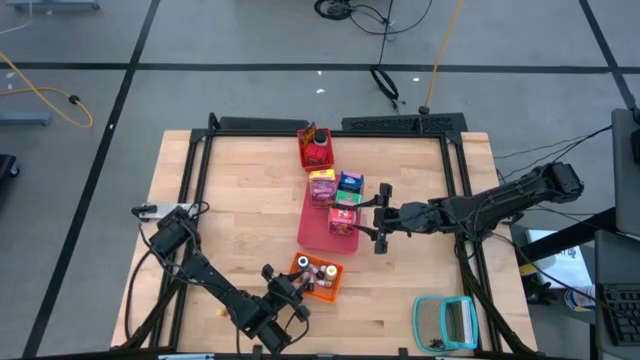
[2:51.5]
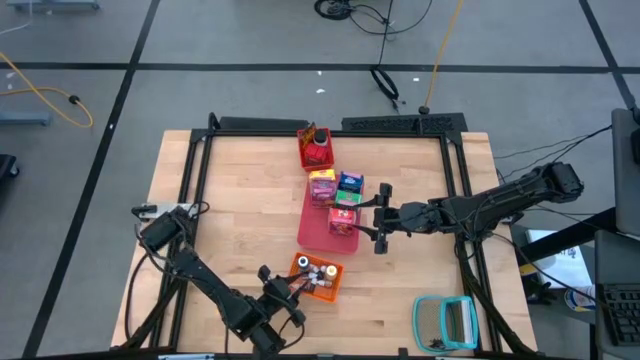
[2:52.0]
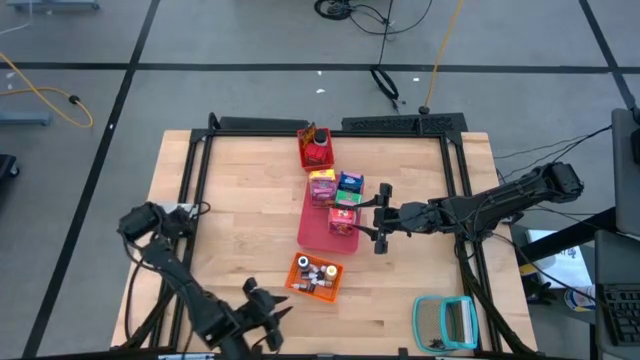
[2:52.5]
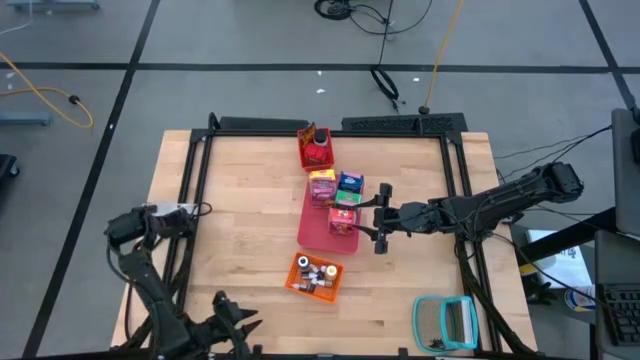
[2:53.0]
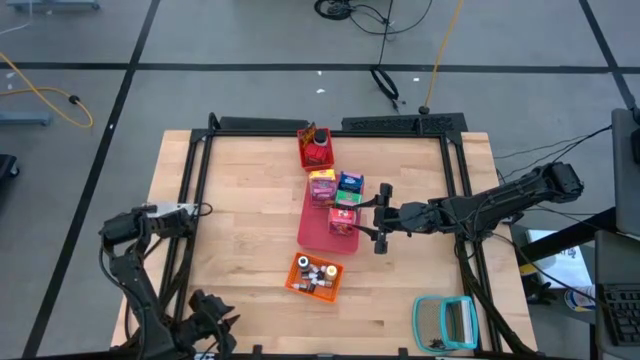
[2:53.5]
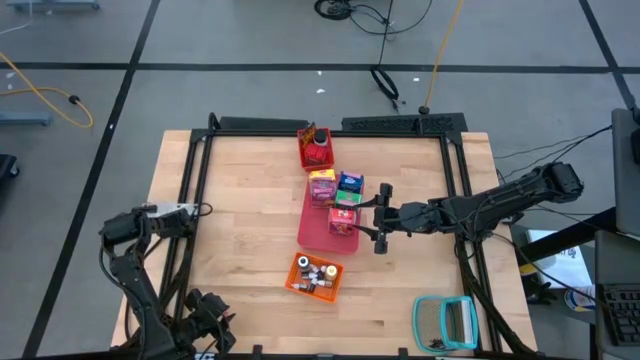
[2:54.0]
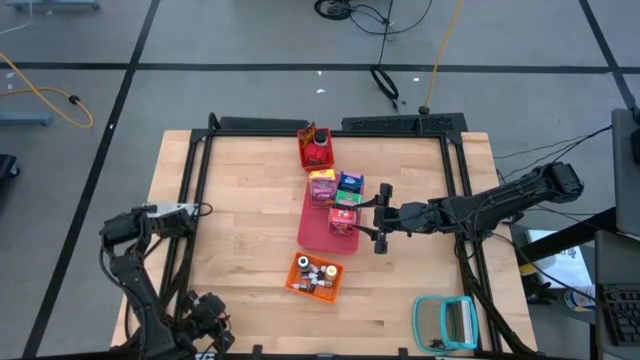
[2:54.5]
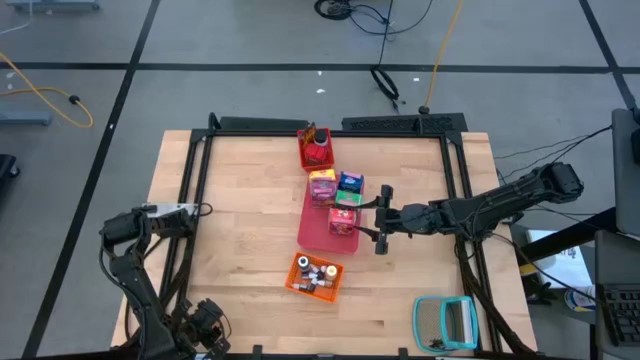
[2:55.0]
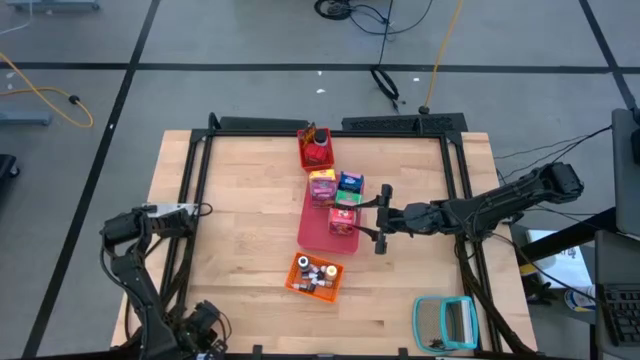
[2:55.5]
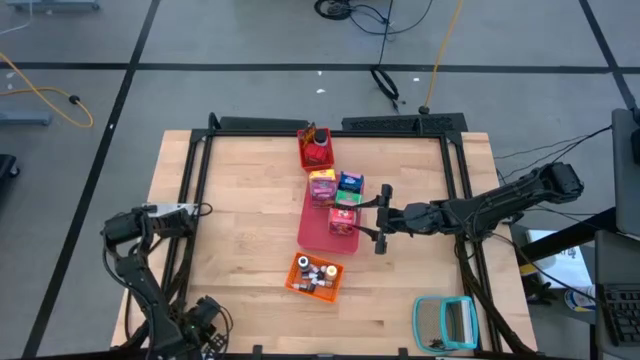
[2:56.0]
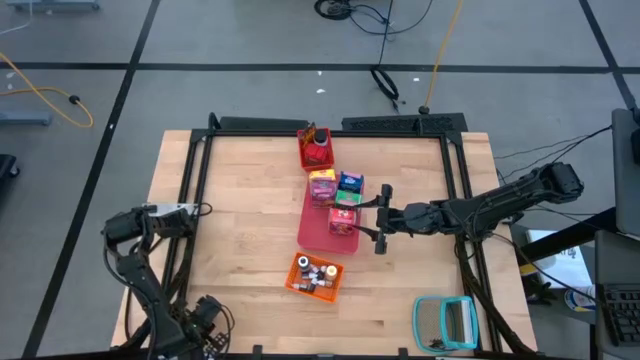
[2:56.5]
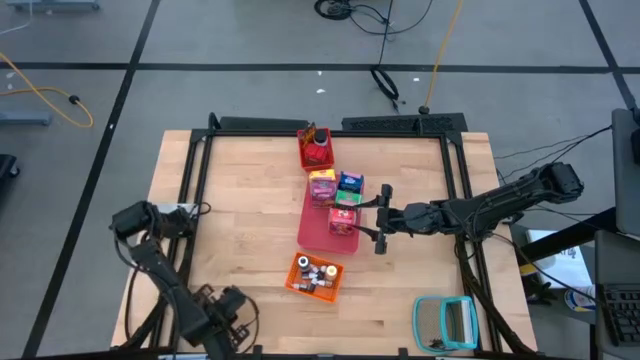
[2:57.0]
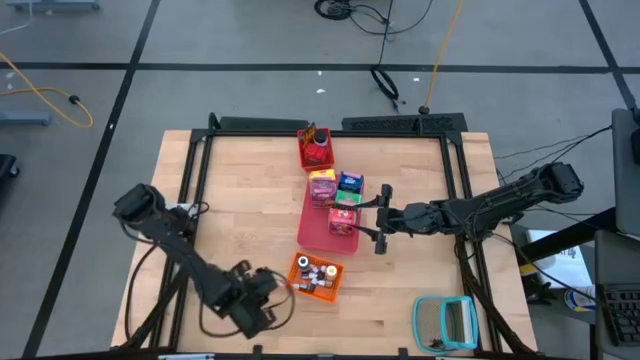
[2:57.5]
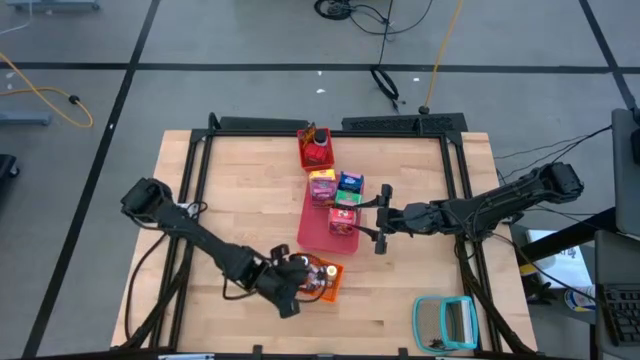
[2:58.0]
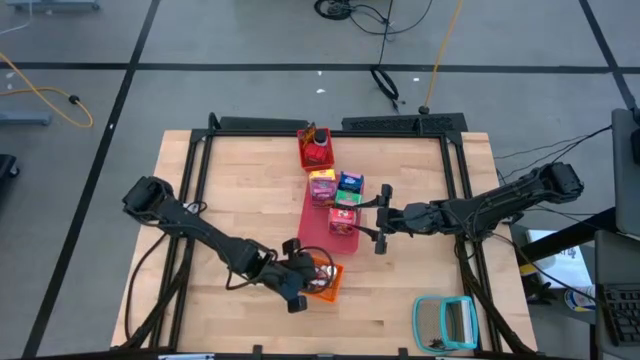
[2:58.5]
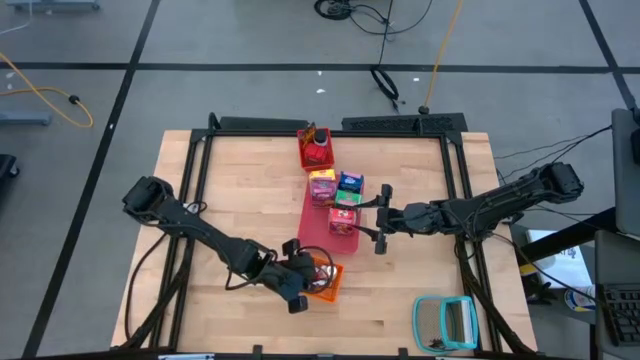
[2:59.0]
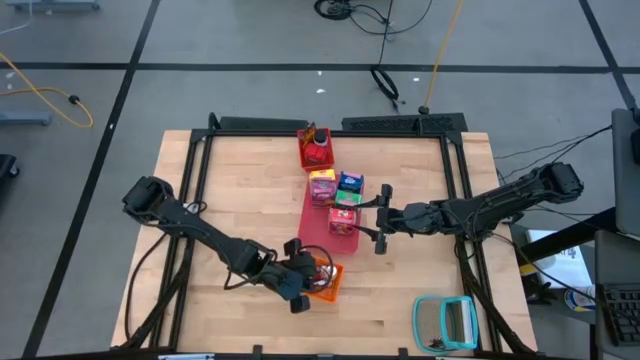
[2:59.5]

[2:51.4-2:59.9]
Task: Pick & Place Kitchen Items
Put the red food coloring bottle into the orange bin

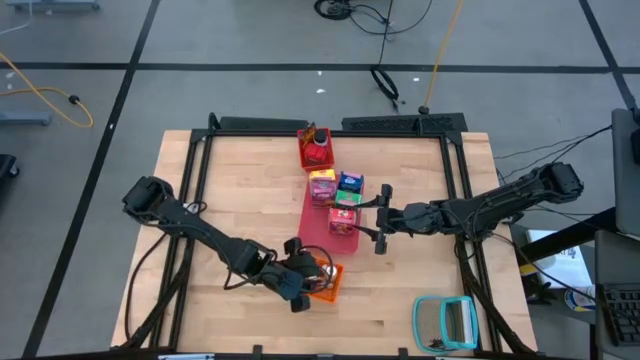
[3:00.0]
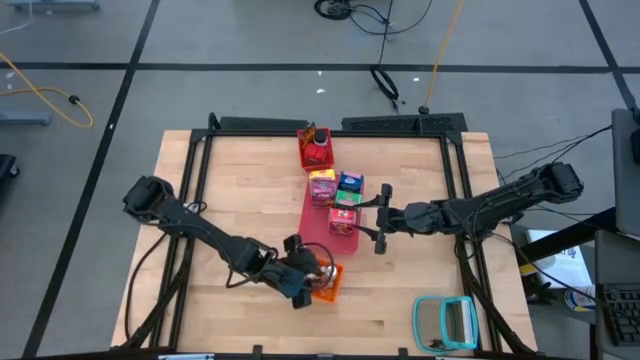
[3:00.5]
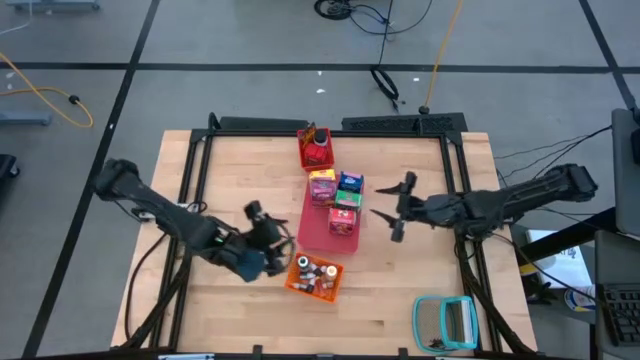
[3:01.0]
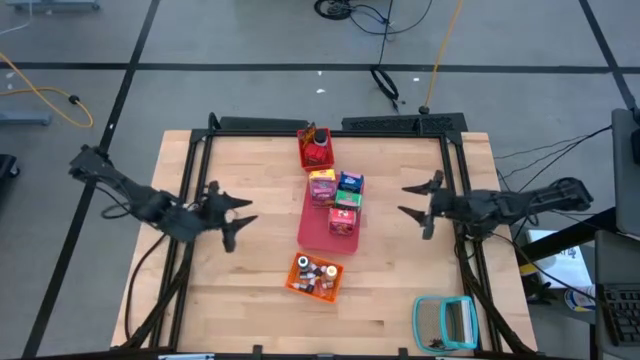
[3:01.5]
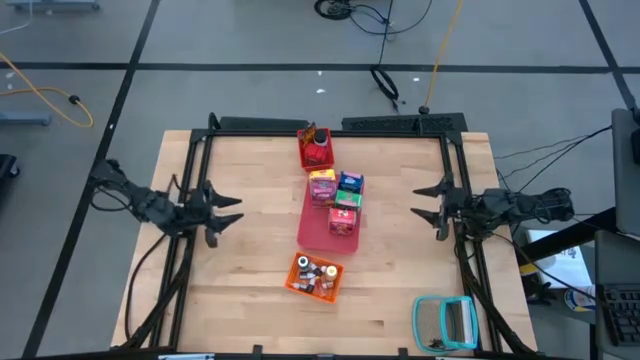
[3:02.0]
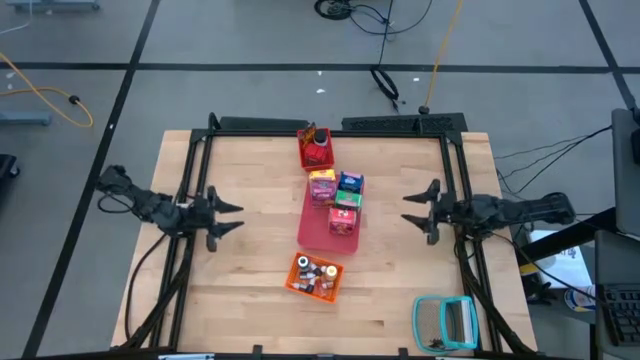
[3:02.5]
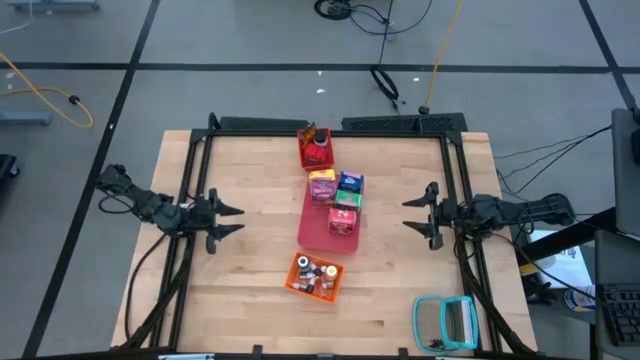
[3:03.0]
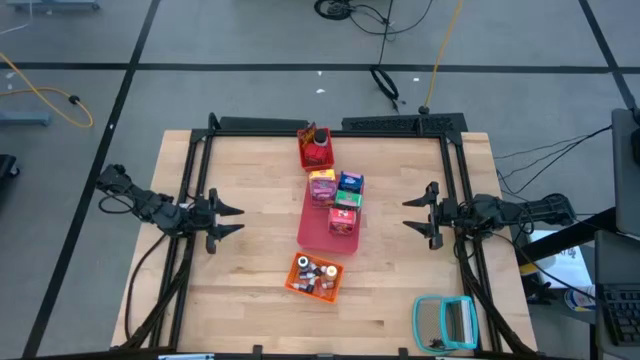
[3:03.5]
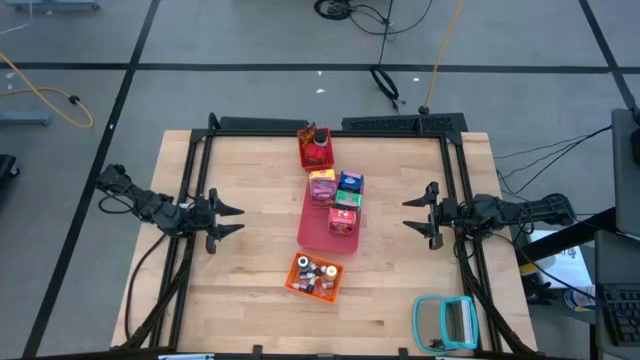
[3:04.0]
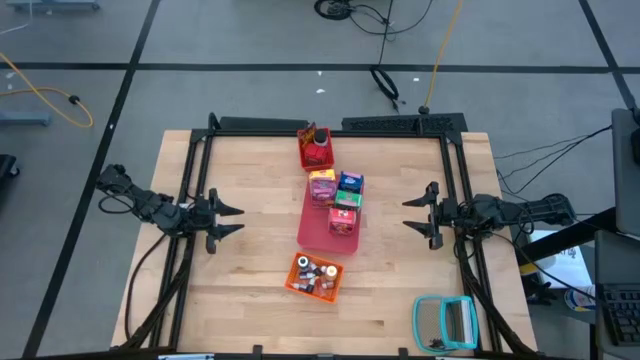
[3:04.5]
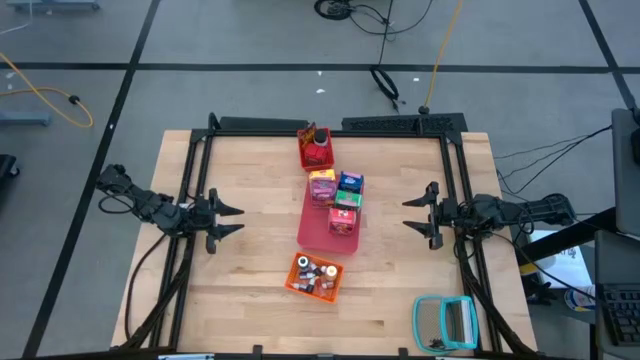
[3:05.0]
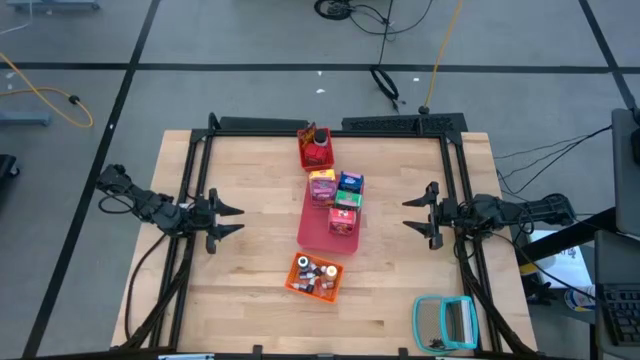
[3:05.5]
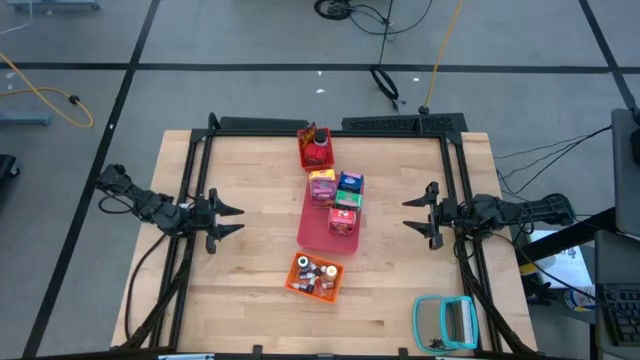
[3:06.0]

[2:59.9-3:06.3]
Return to Home Position

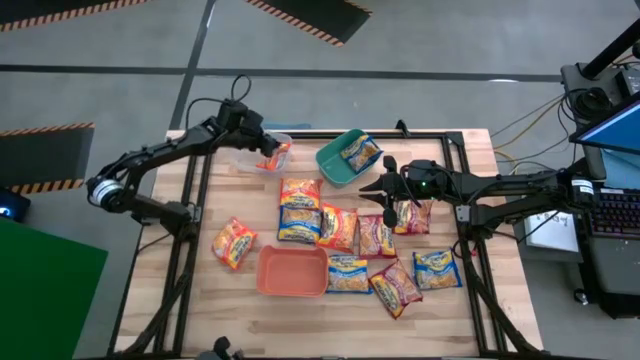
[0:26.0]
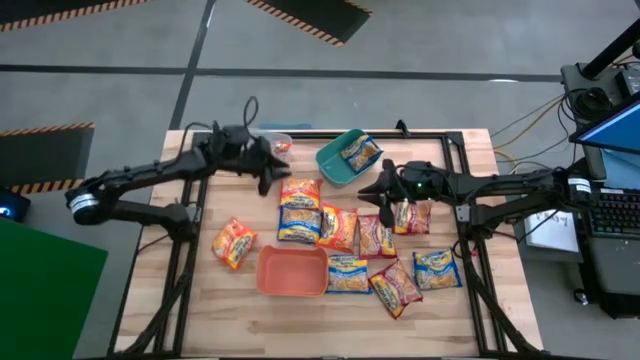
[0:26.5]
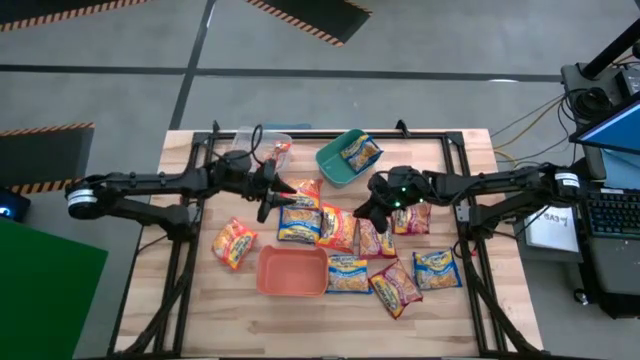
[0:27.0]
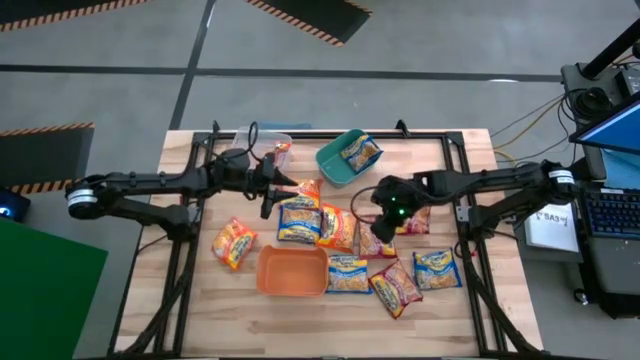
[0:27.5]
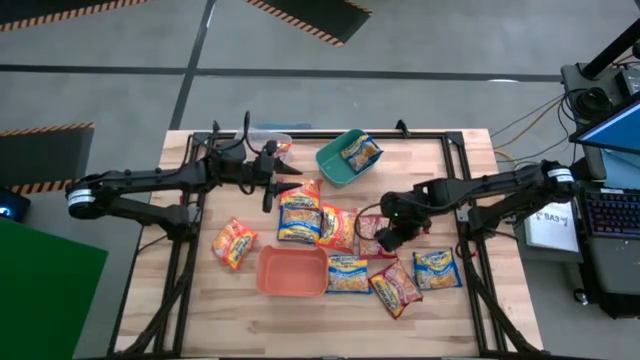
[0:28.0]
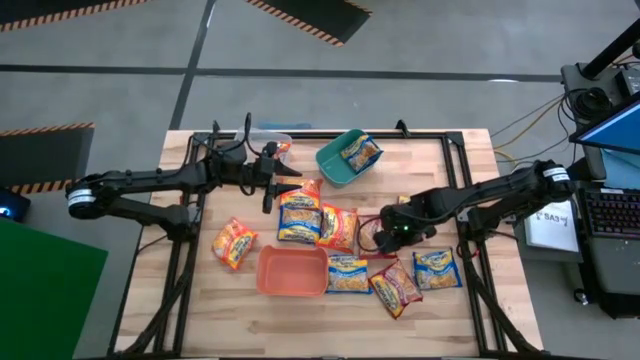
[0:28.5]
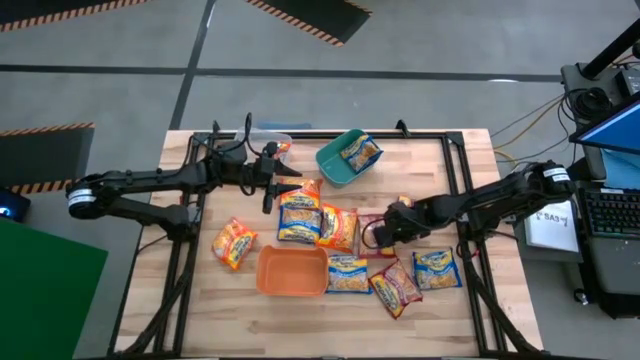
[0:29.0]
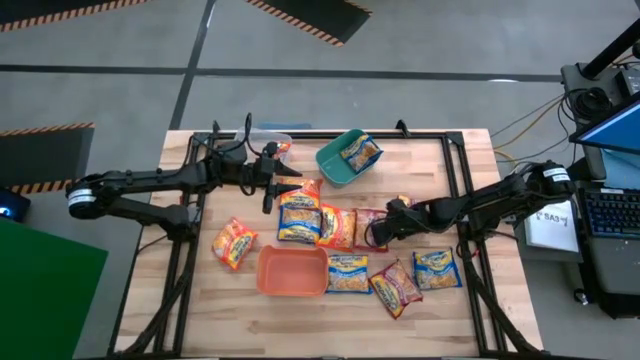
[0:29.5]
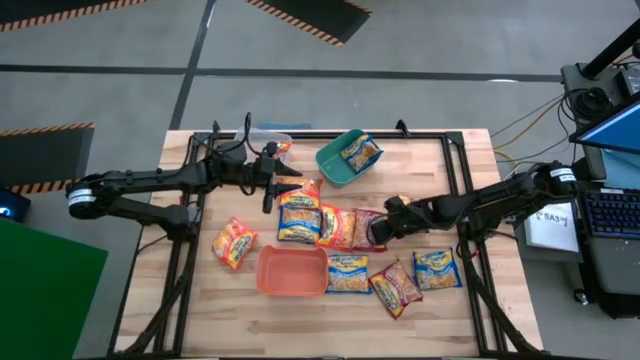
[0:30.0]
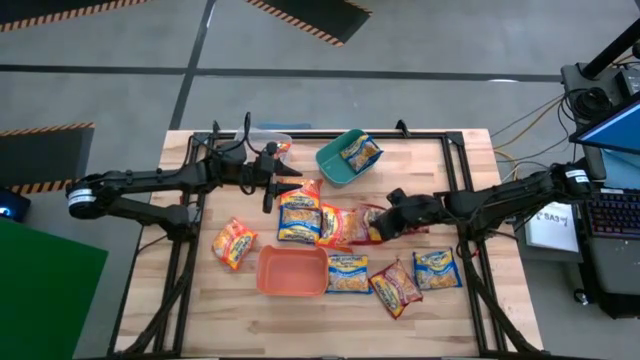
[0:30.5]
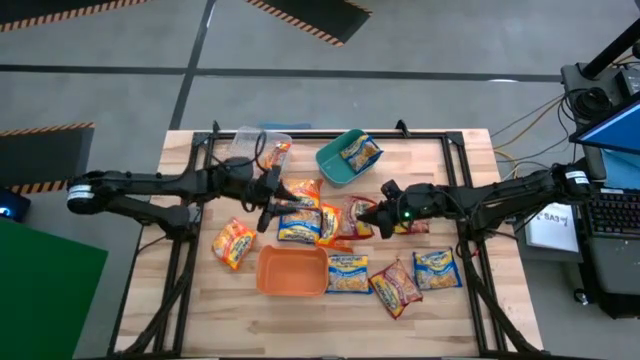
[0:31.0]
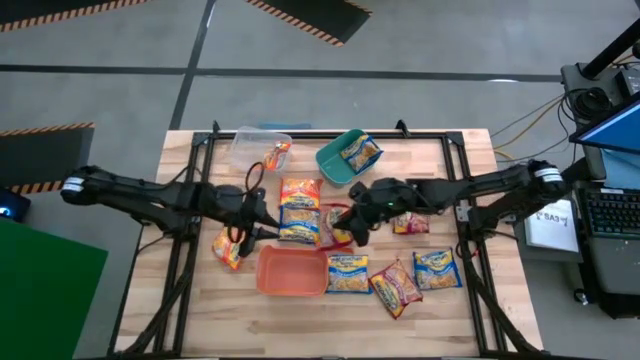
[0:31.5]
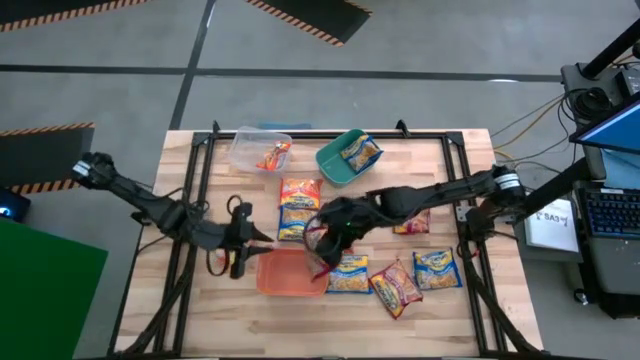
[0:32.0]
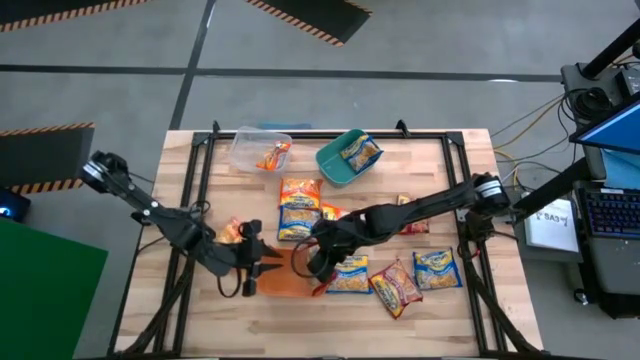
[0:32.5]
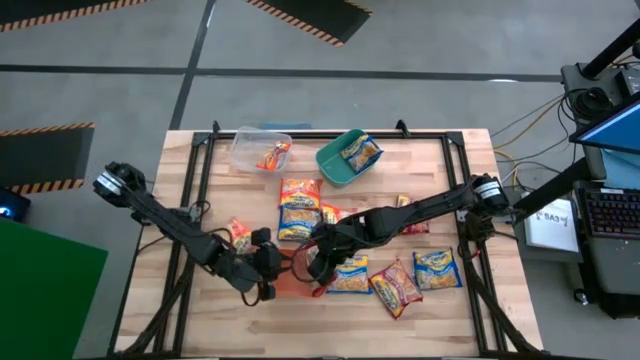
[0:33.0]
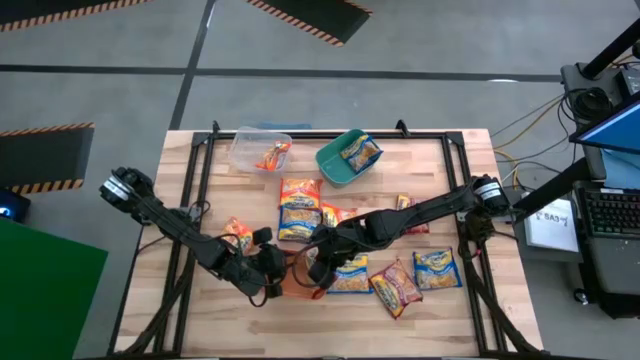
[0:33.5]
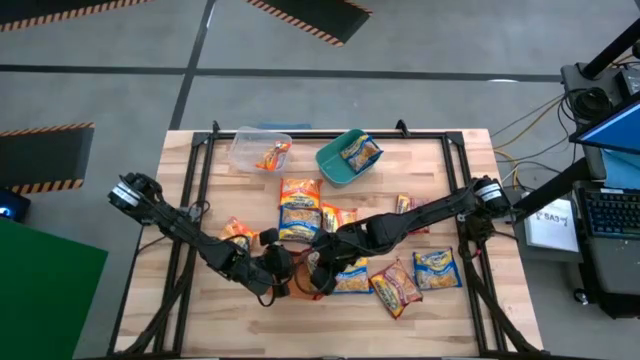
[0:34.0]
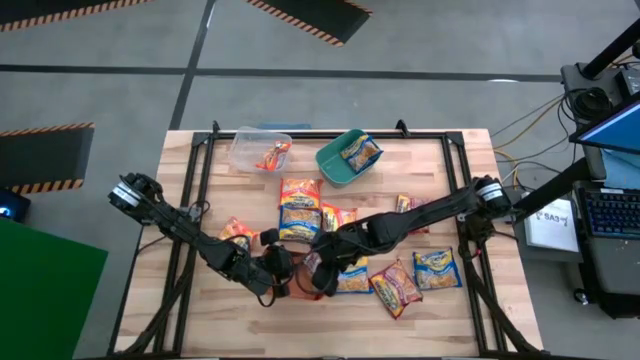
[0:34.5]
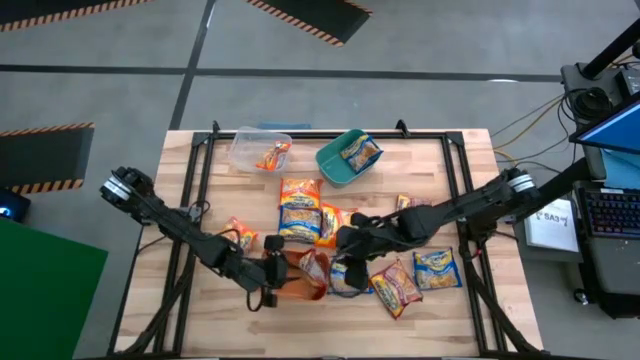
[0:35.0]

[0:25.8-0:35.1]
Task: Sort Maruchan noodles
Put the red noodle pack into the orange bin
